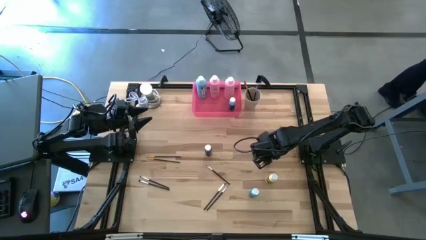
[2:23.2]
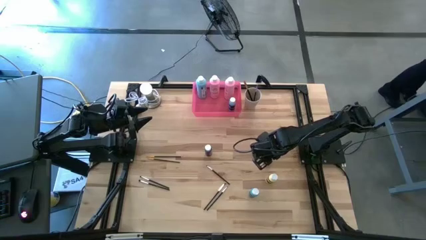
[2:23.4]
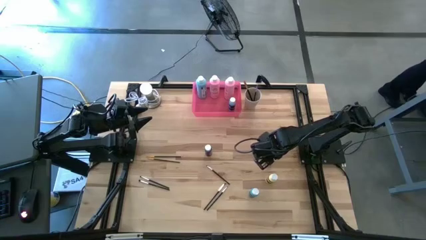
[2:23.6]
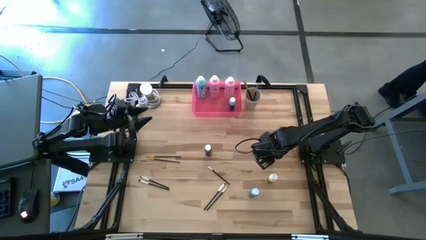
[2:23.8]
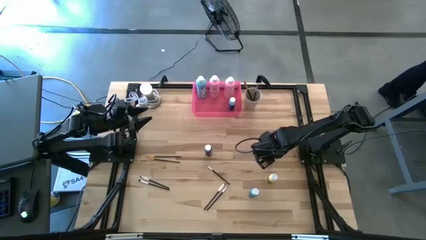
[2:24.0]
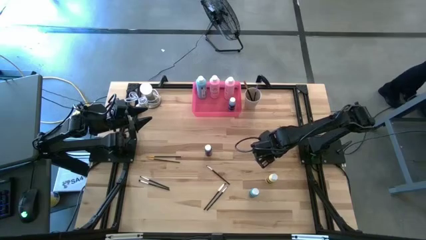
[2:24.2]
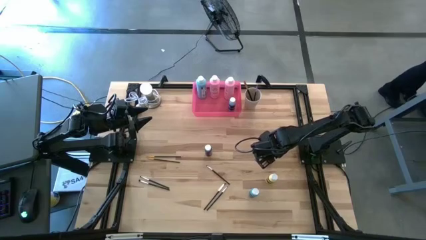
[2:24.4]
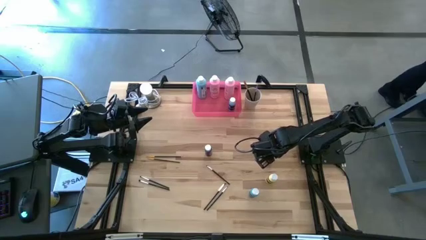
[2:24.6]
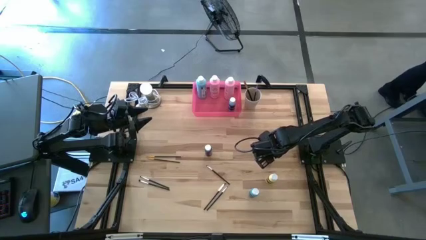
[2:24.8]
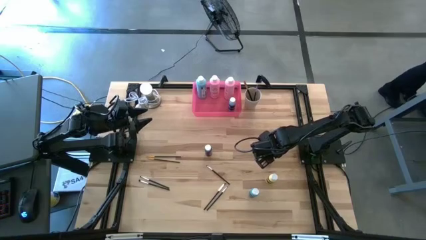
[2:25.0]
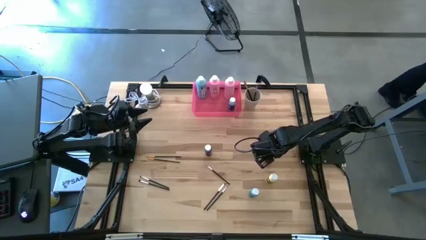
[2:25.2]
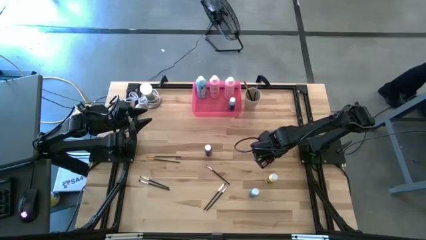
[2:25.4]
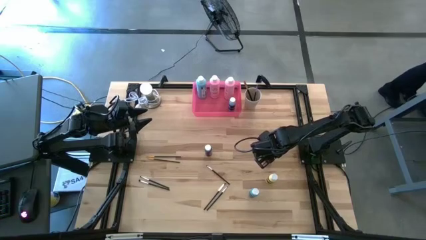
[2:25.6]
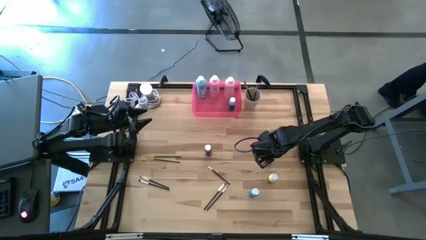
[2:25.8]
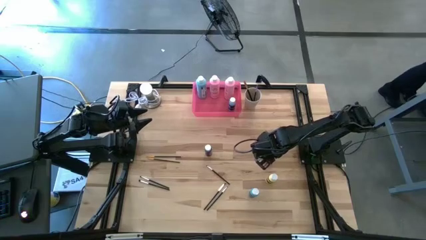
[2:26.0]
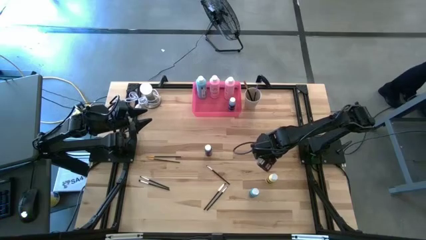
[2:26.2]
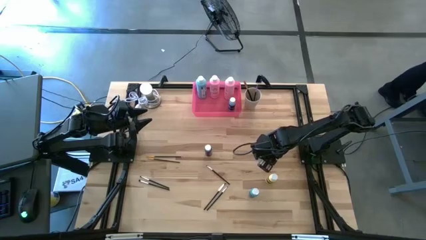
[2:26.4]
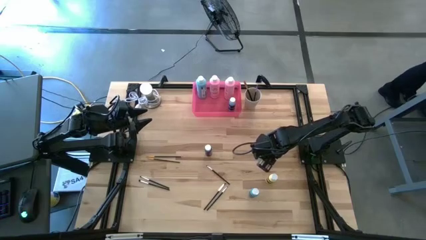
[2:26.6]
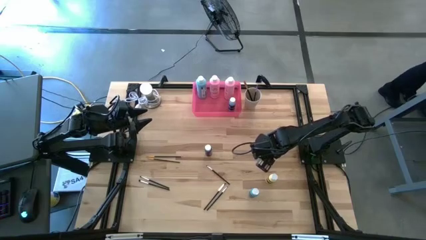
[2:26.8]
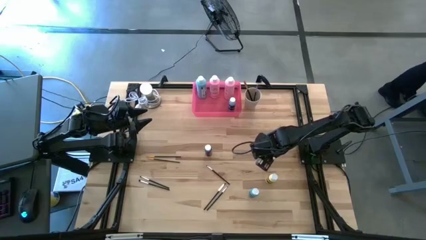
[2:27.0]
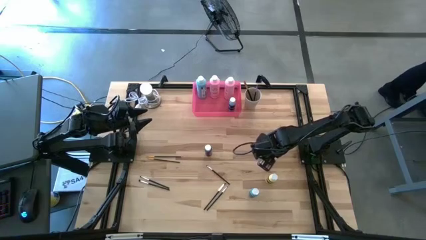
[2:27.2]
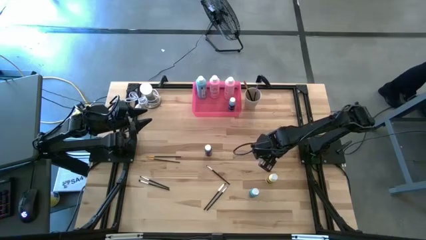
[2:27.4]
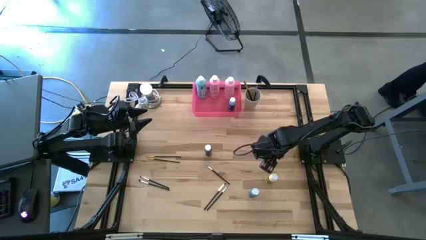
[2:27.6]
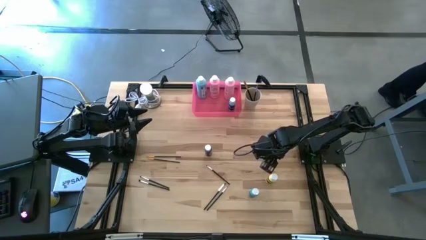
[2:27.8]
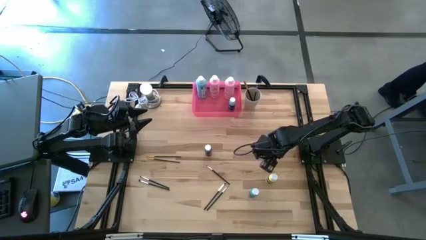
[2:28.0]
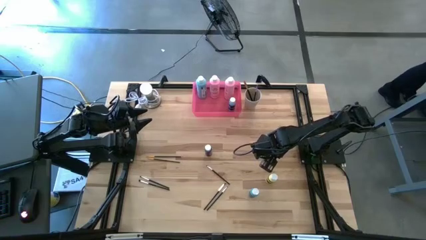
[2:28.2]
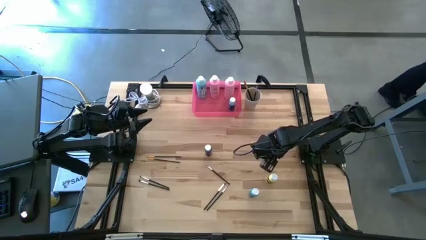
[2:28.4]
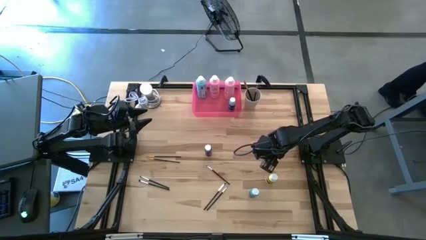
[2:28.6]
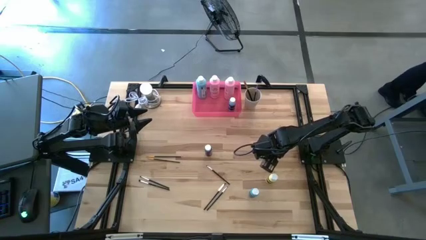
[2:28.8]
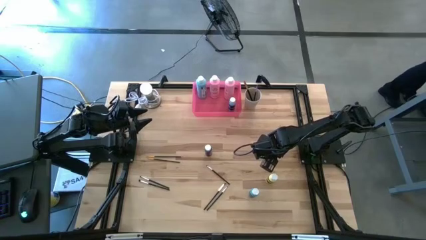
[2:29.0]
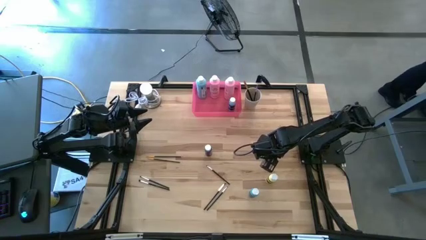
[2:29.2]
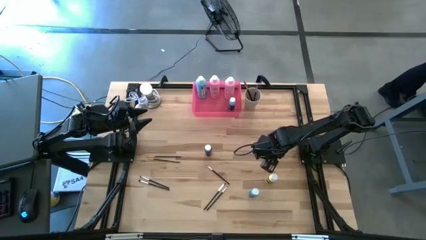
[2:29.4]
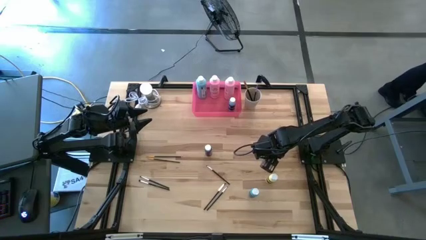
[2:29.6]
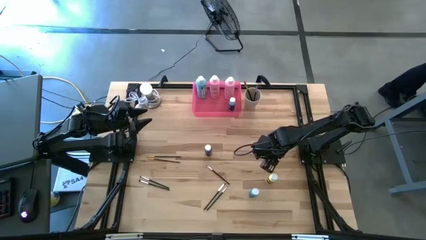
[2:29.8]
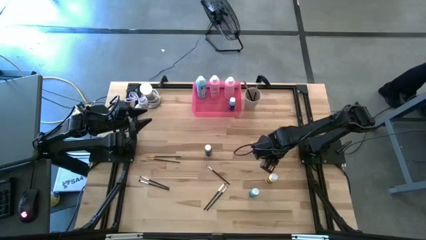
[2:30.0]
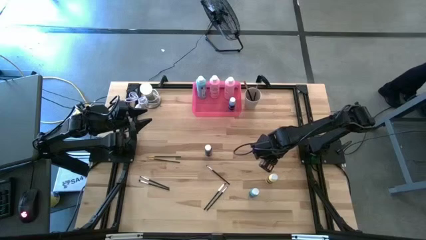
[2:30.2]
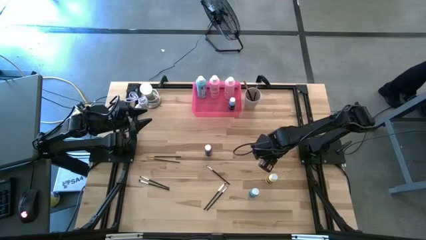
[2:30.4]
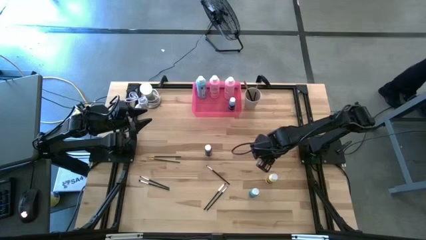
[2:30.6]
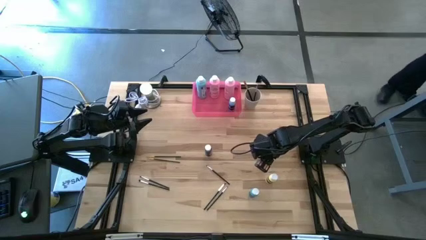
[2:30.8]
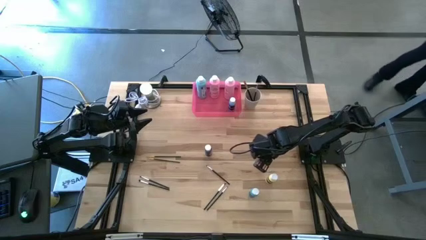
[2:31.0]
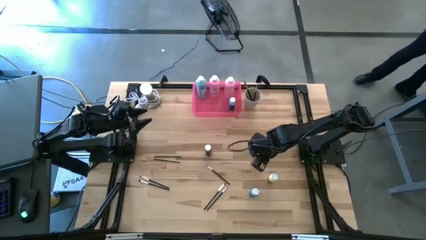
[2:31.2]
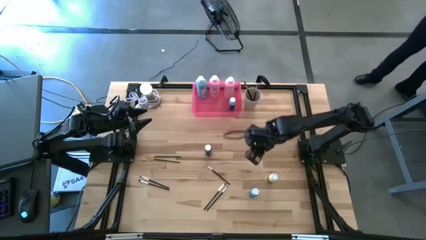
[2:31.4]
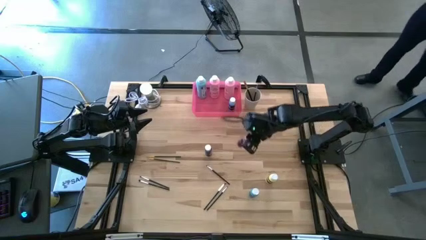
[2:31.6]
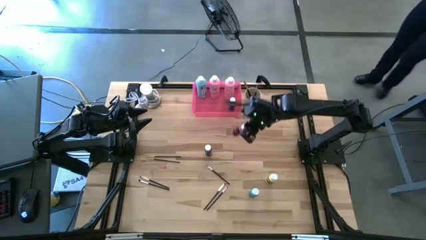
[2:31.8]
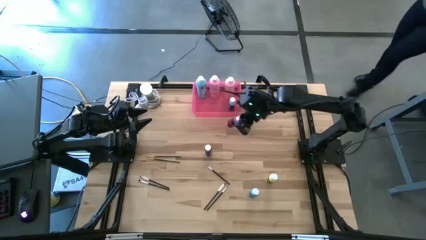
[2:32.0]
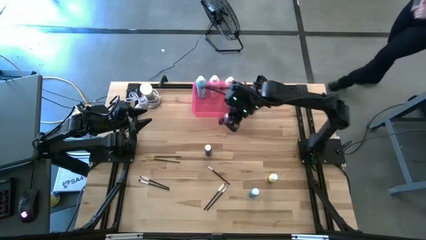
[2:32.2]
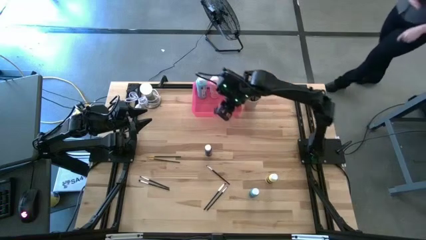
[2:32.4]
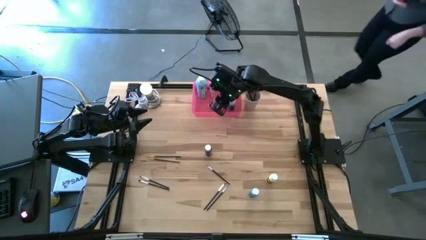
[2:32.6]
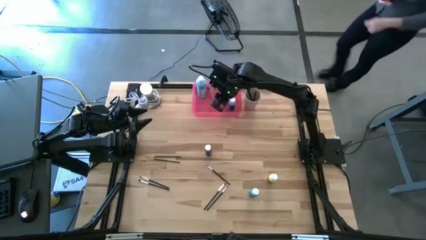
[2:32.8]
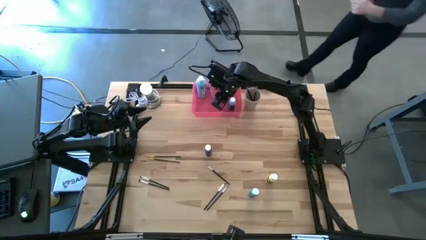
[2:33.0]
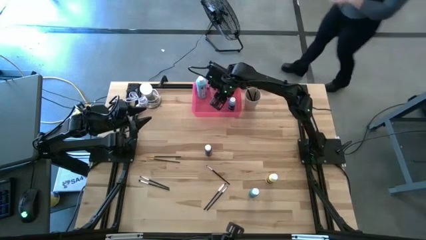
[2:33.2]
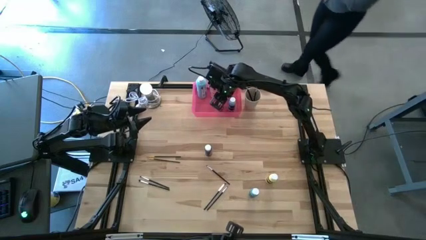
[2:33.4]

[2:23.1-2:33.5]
Task: Pick & Place Paint Supplies
Put the small pink paint bottle into the pink bin

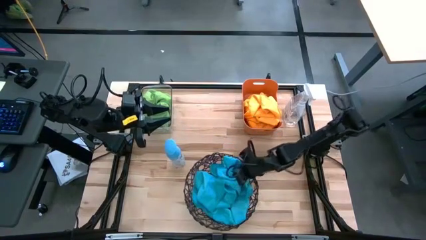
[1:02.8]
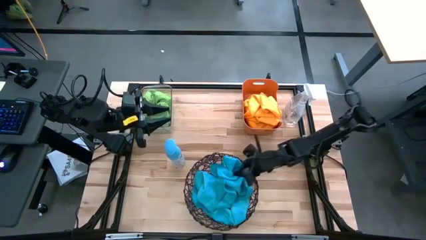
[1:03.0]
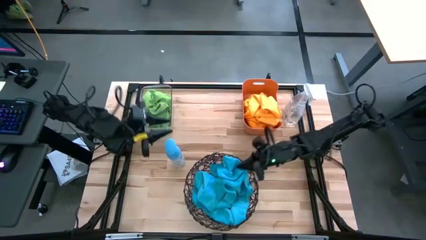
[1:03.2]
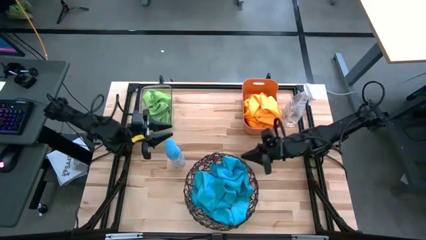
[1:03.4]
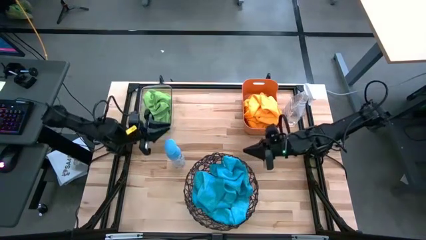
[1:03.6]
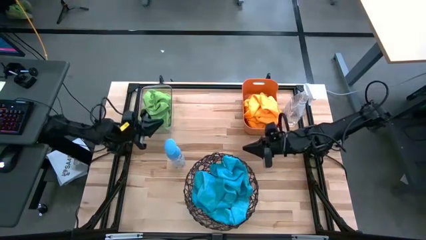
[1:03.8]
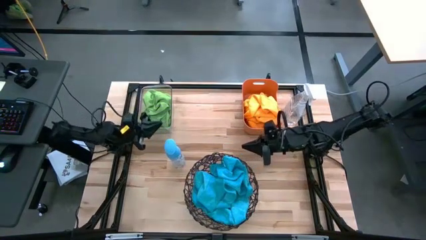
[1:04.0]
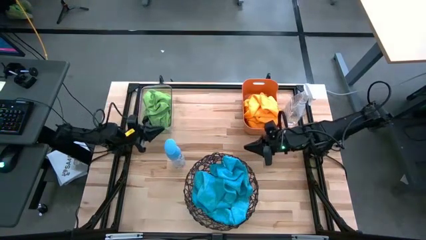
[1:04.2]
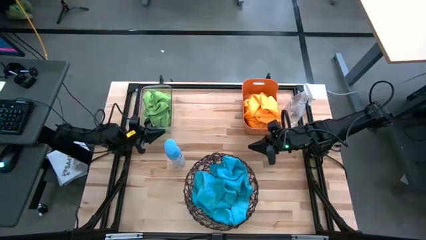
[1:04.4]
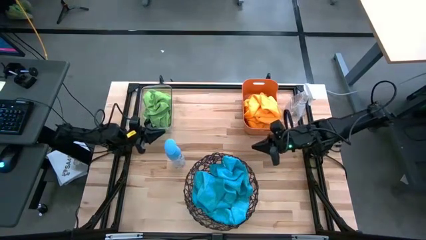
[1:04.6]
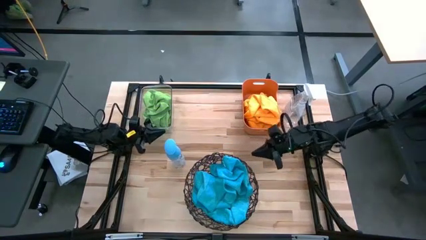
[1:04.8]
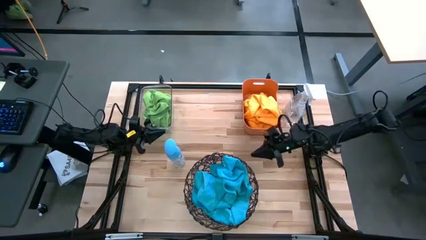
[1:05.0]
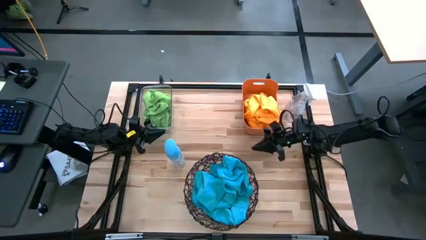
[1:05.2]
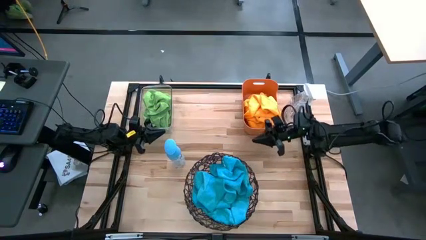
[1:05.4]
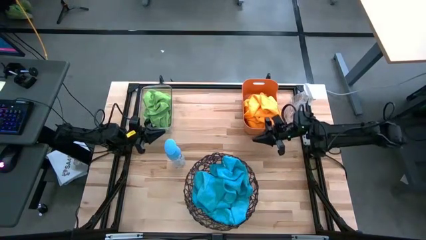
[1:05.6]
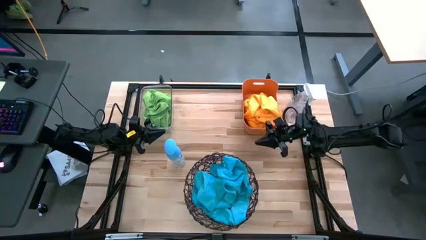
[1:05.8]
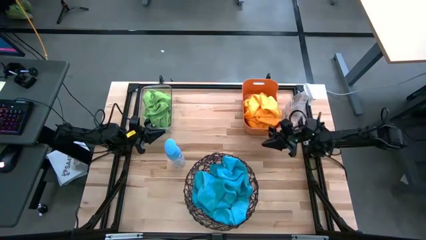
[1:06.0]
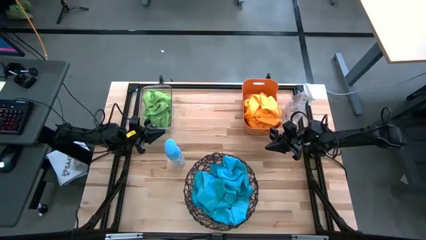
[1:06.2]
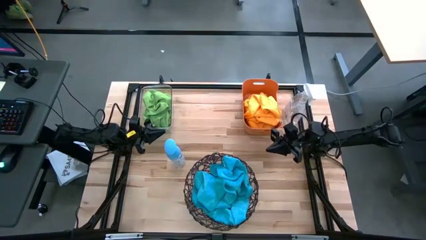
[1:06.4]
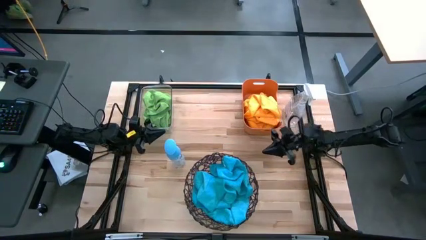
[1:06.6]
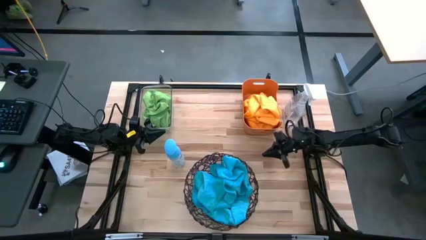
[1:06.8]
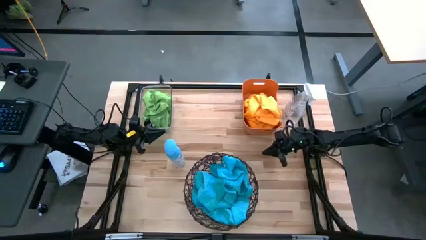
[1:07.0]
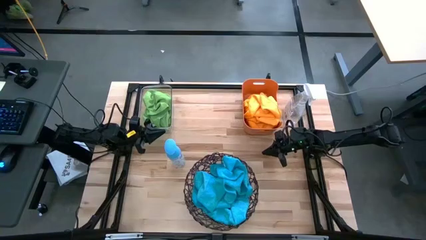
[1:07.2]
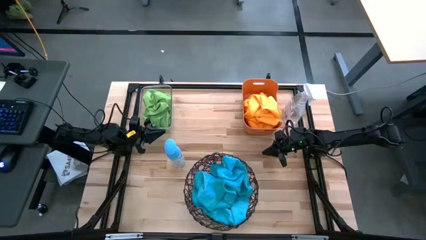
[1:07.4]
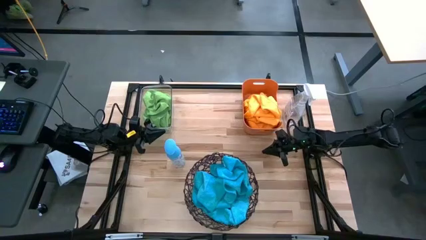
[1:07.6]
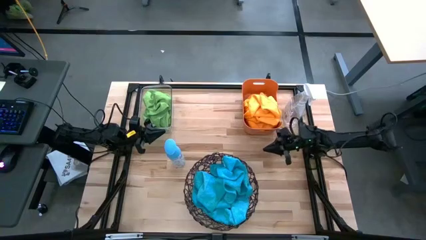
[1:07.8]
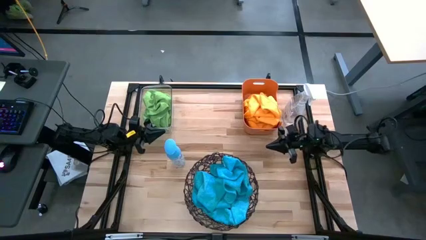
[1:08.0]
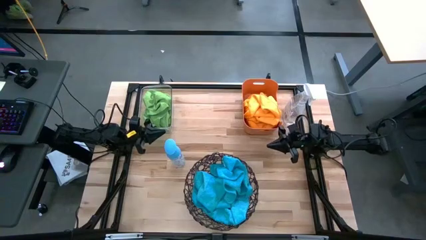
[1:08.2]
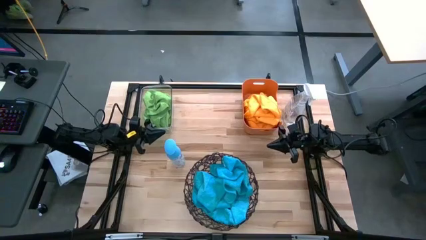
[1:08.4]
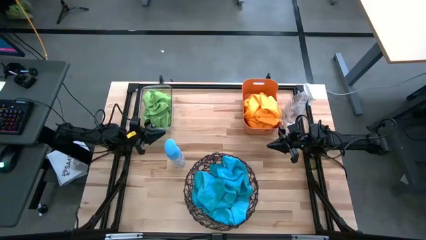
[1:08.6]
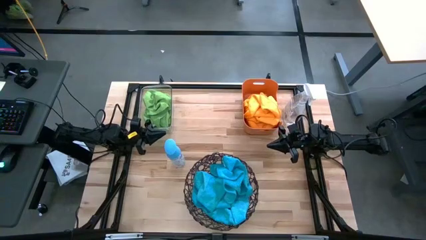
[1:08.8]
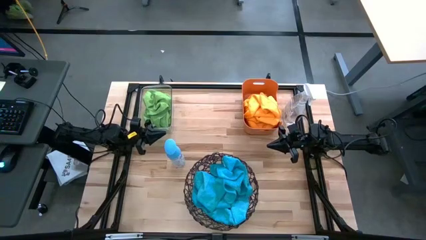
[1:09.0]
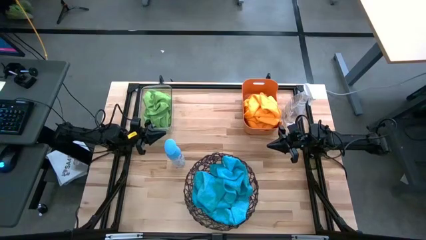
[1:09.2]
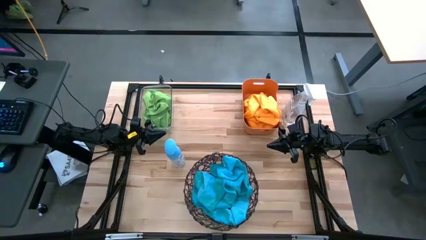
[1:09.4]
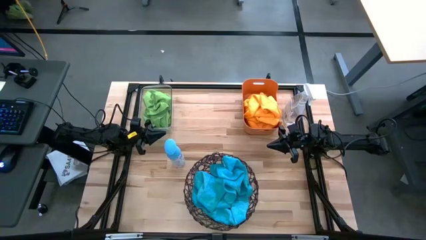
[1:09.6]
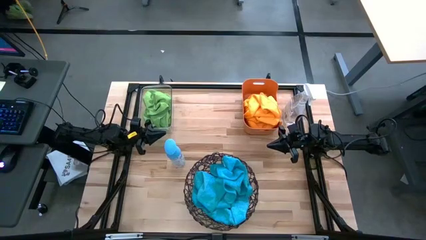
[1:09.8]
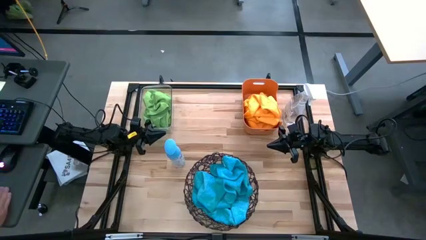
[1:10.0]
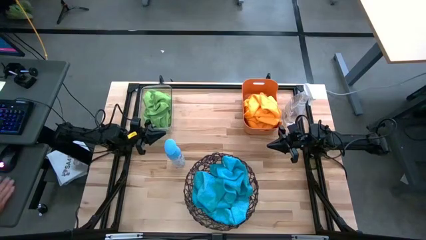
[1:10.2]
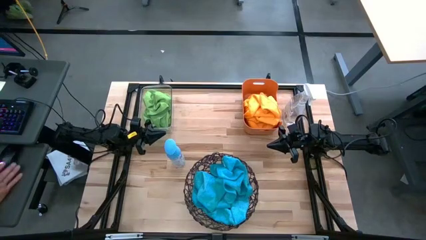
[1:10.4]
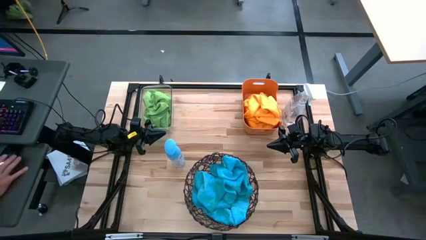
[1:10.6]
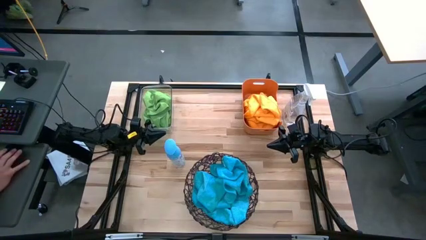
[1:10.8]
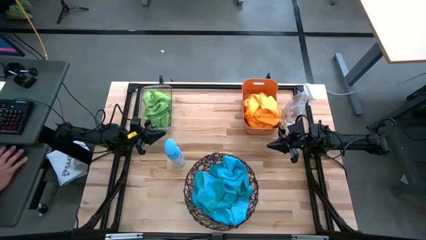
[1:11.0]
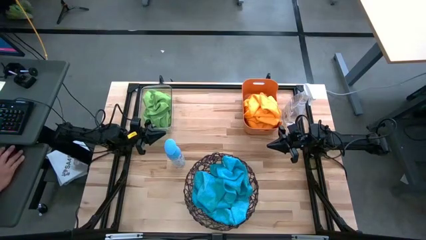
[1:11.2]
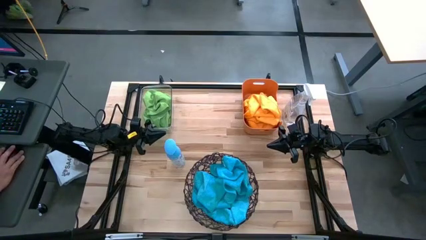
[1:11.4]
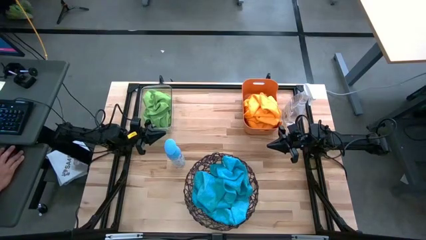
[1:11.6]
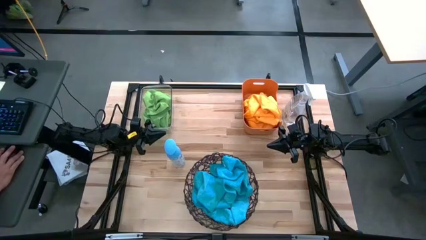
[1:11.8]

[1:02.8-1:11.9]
Task: Sort microfiber towel by color & place in baskets
Return to Home Position
